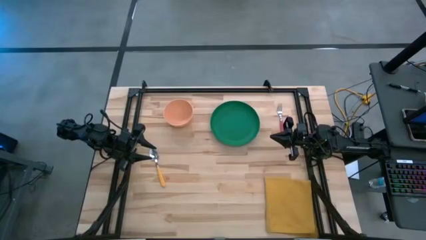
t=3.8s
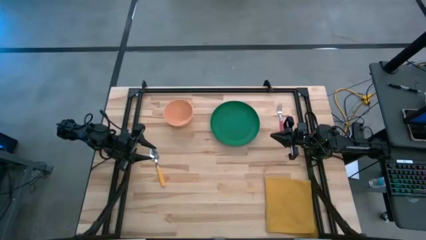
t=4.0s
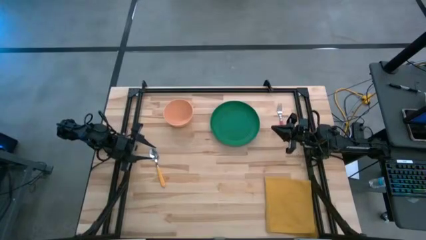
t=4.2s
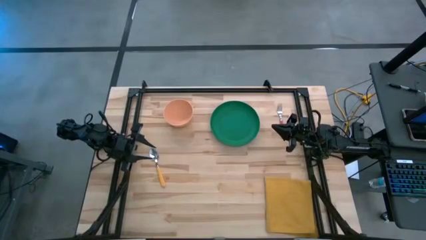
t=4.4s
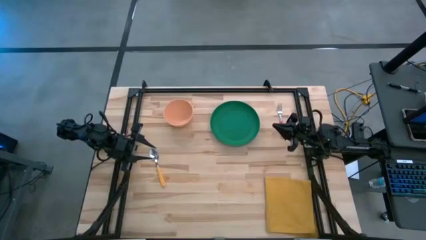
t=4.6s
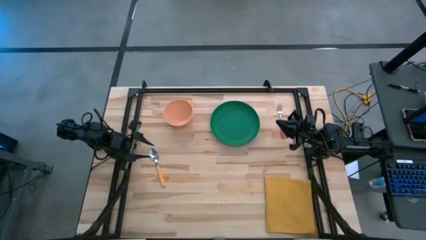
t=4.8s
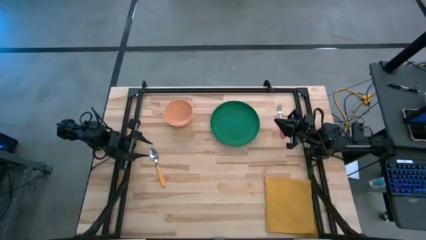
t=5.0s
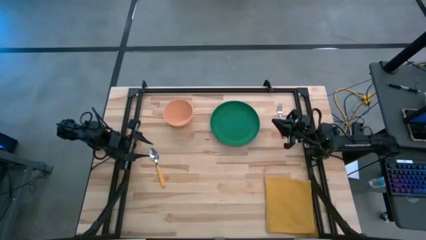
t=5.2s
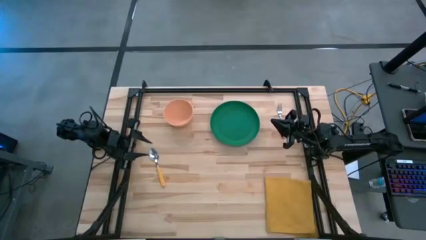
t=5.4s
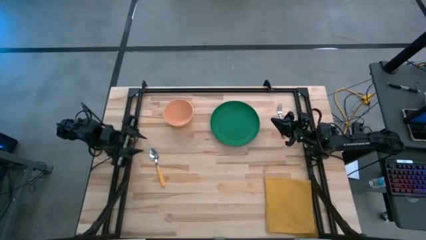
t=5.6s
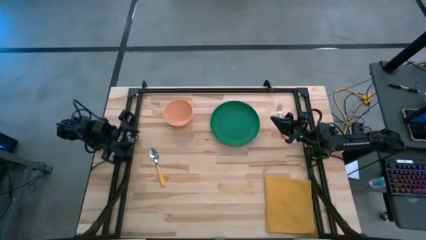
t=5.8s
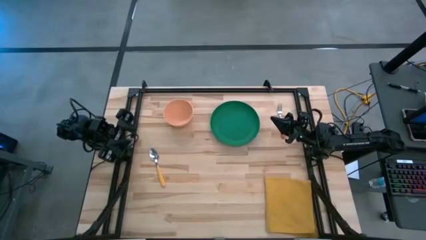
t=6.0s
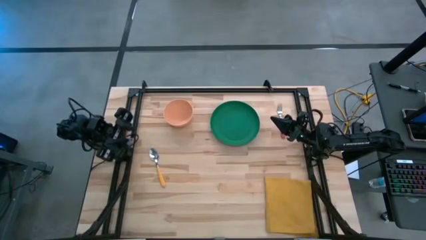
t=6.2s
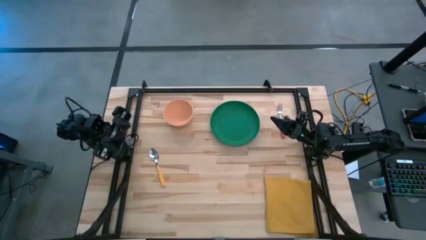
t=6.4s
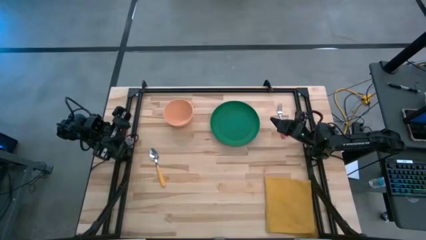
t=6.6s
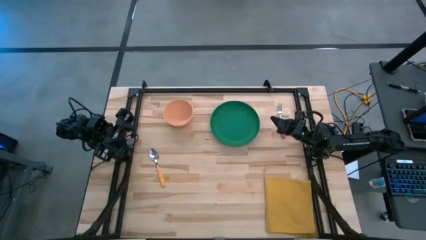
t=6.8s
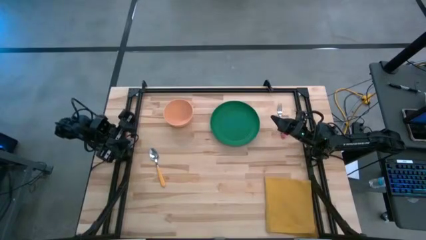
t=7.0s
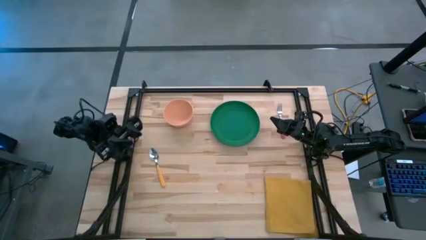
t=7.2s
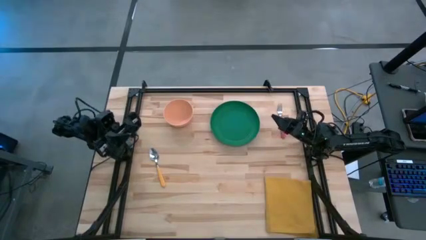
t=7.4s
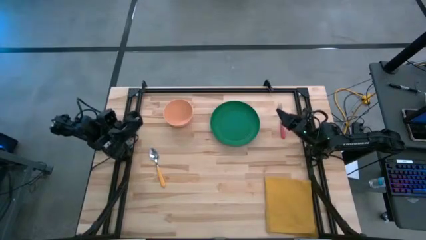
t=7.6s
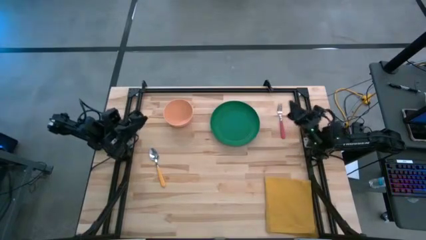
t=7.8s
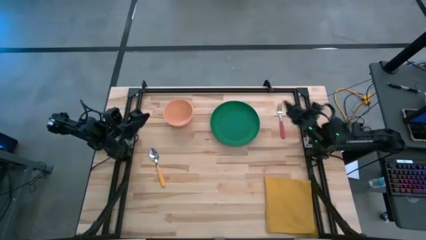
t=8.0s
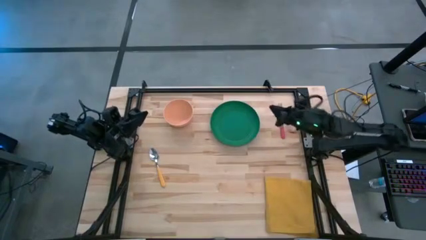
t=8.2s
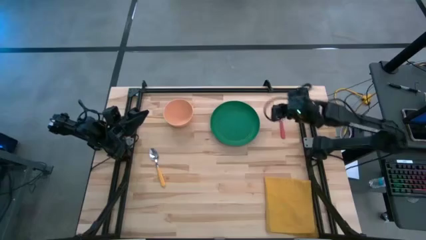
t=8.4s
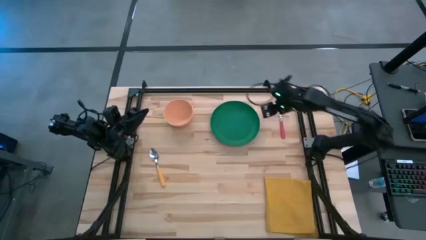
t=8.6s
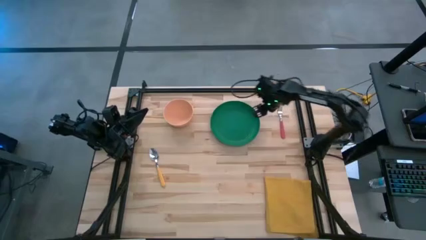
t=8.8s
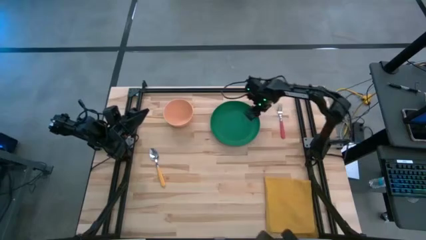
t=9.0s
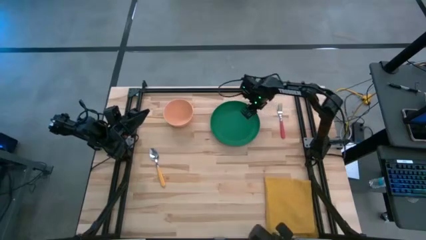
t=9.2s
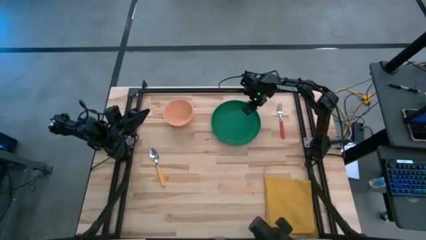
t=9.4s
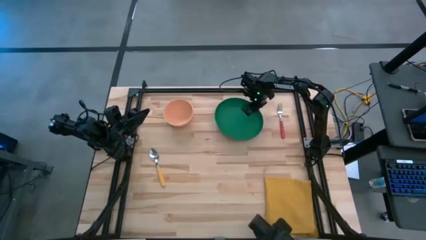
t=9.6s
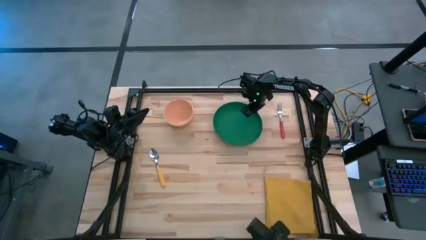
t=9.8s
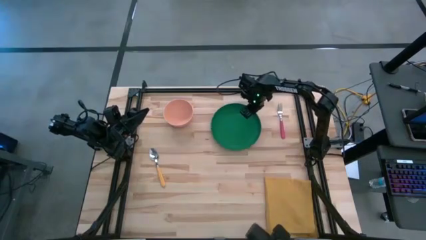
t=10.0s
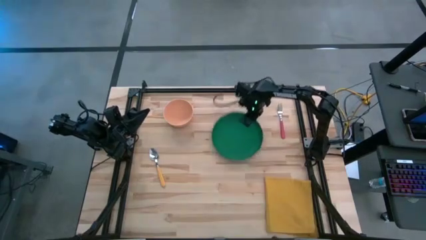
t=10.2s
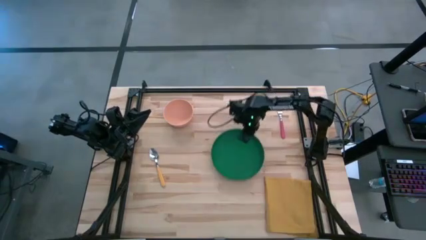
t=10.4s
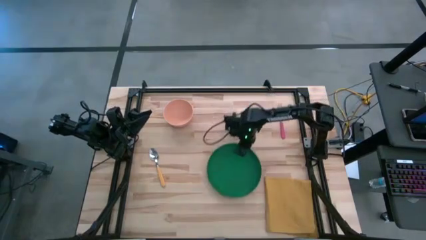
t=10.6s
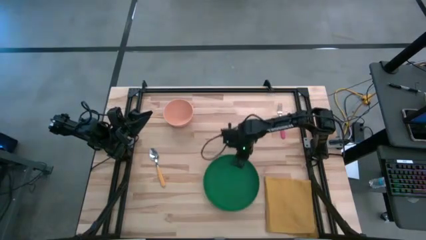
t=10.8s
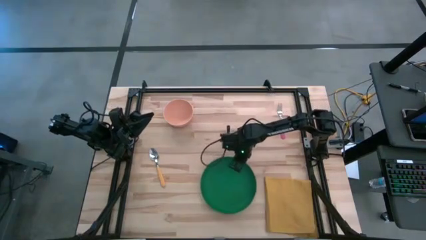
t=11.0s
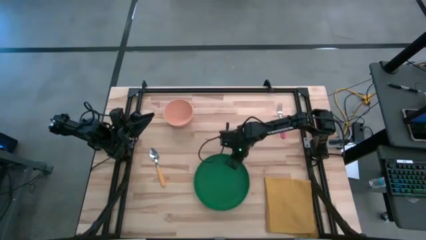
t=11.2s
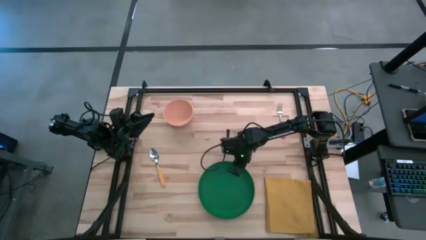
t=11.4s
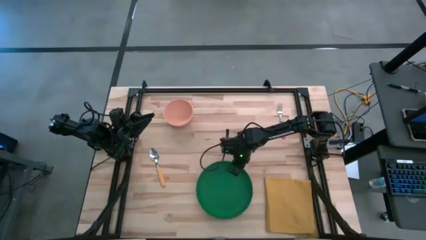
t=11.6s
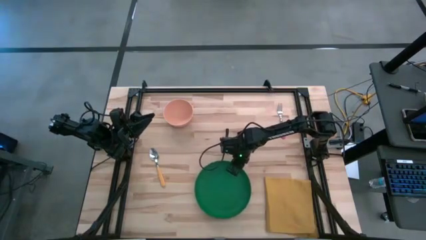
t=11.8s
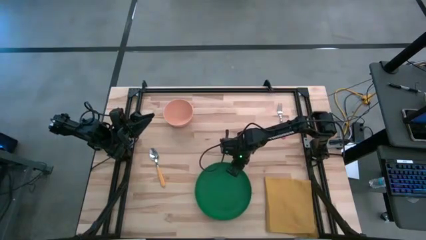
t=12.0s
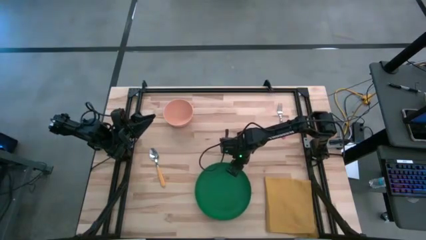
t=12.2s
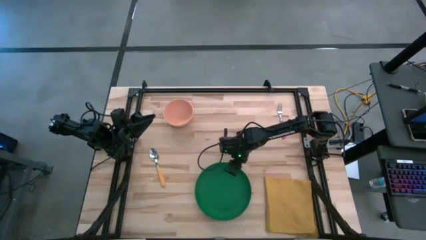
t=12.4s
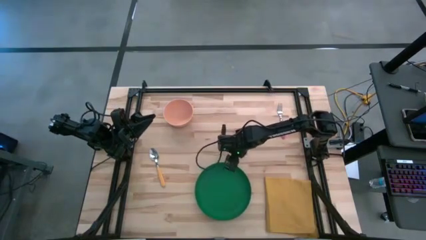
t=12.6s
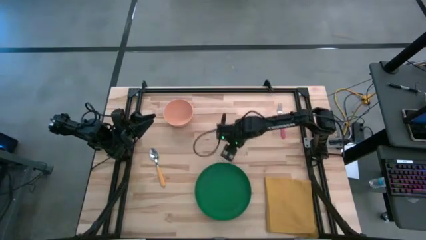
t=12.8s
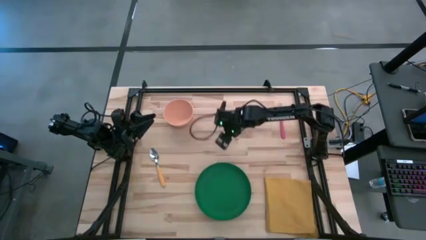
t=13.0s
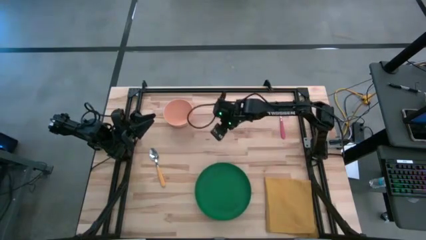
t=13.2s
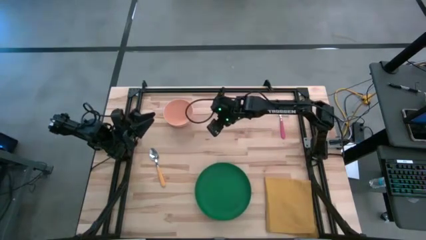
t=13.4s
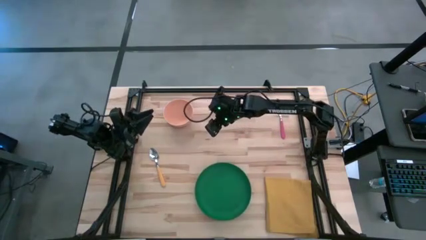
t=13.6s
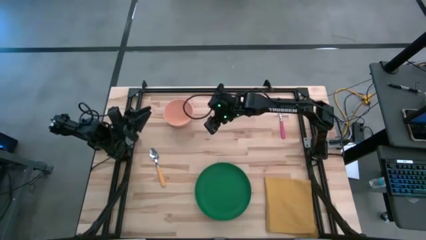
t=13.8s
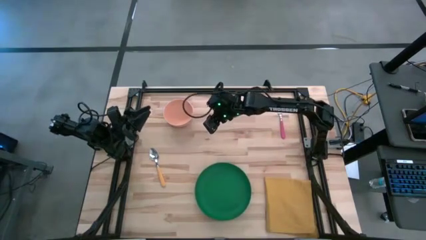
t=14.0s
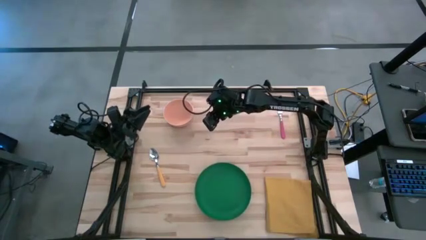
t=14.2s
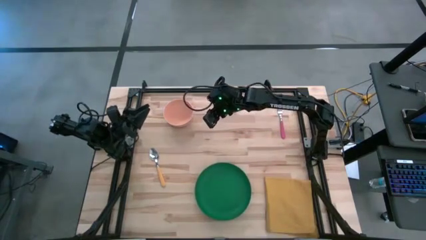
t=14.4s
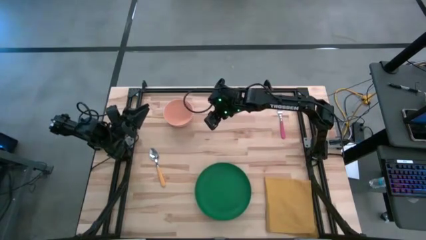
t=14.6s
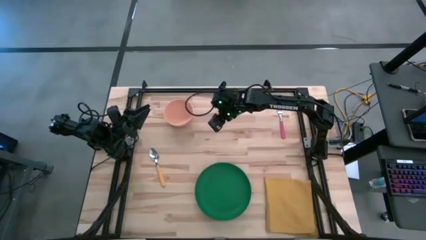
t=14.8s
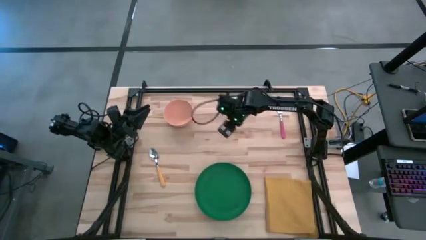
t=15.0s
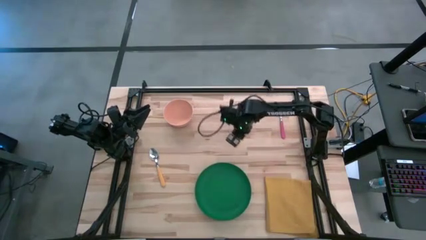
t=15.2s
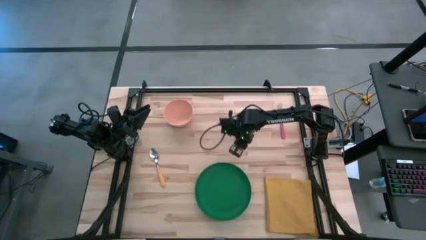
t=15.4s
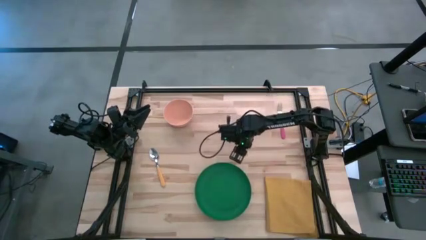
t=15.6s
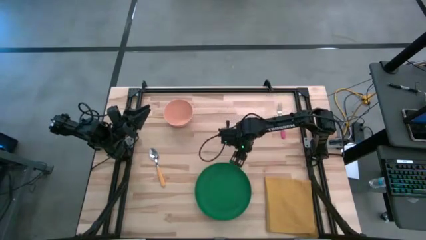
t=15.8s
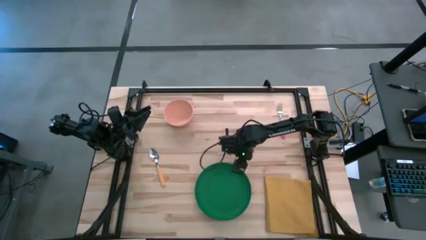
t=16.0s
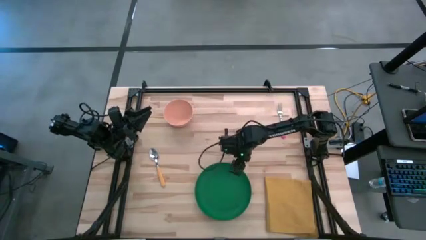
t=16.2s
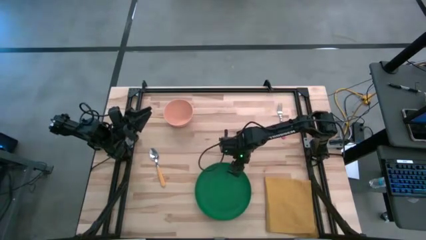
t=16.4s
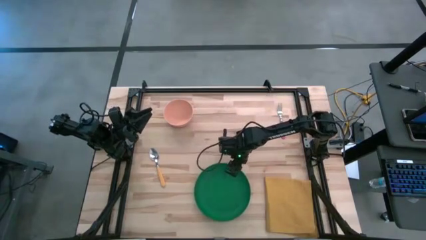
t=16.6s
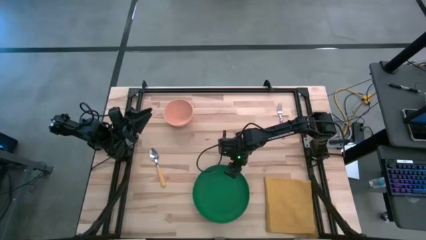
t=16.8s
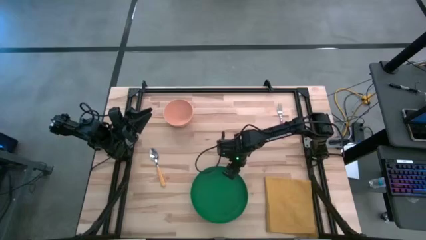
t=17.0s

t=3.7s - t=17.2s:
Task: Set table place
Move the green plate to the bottom of the table

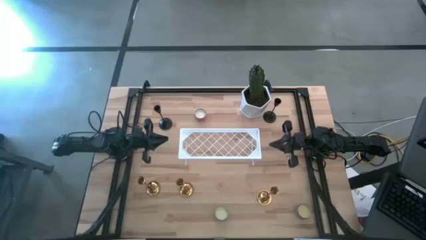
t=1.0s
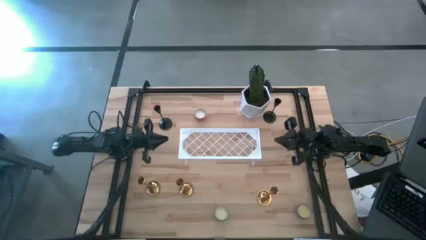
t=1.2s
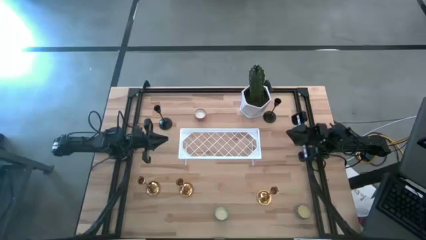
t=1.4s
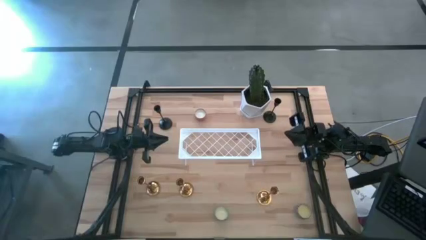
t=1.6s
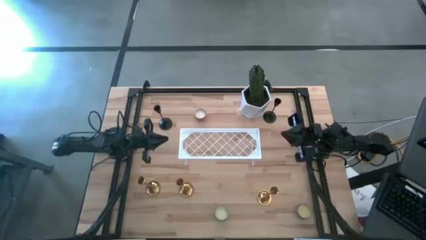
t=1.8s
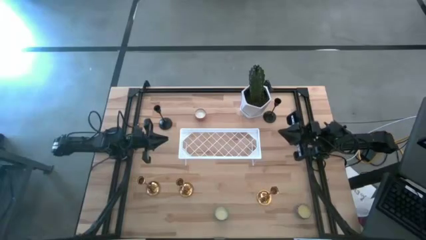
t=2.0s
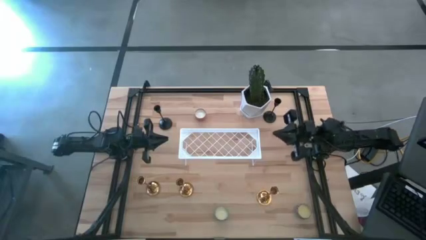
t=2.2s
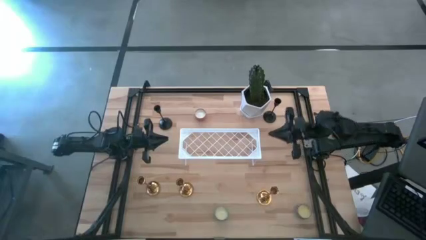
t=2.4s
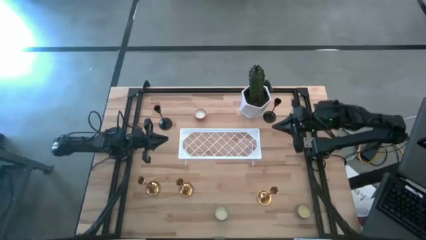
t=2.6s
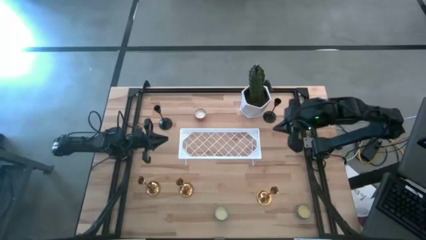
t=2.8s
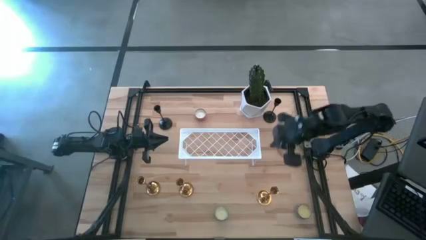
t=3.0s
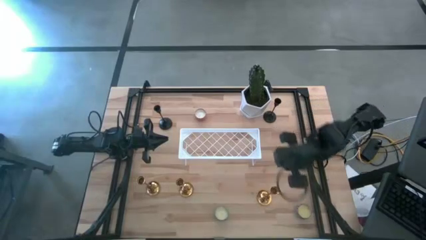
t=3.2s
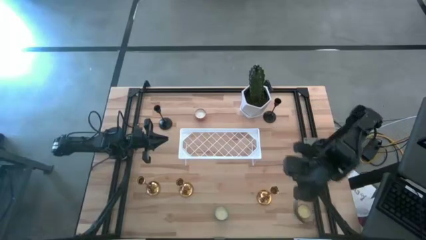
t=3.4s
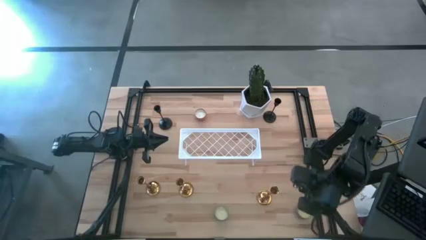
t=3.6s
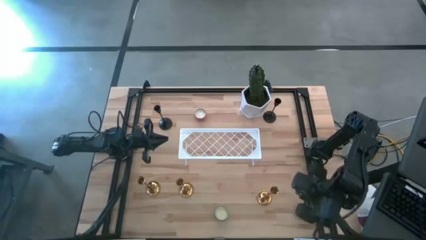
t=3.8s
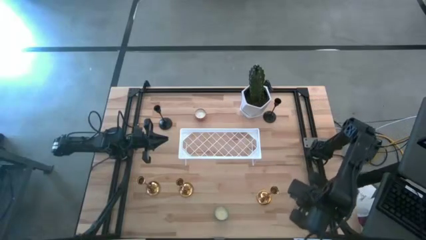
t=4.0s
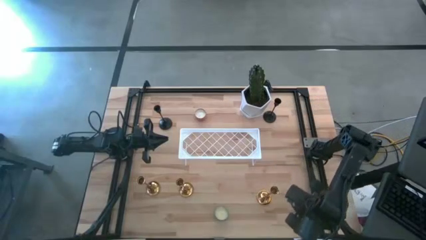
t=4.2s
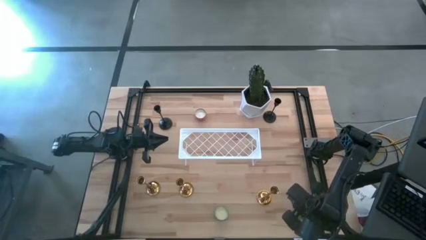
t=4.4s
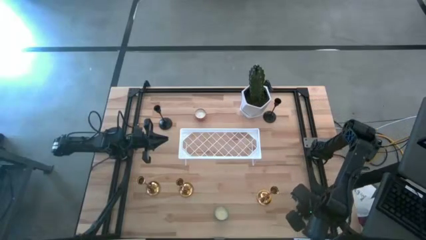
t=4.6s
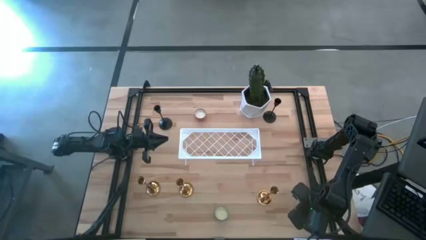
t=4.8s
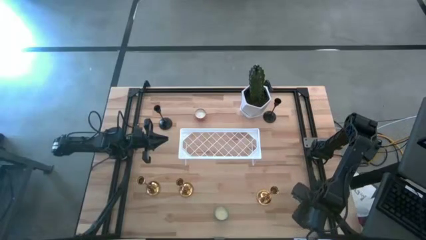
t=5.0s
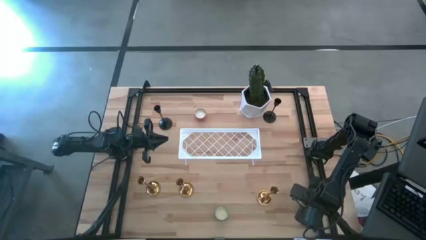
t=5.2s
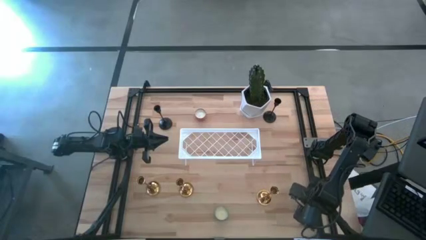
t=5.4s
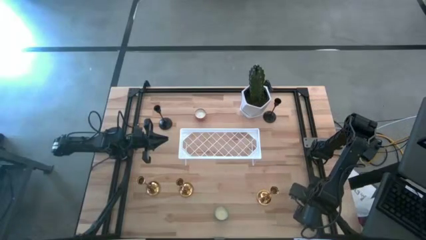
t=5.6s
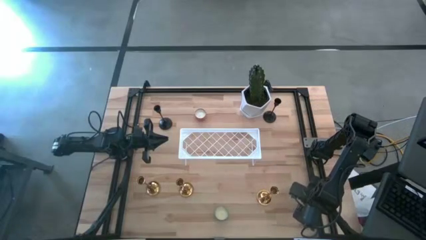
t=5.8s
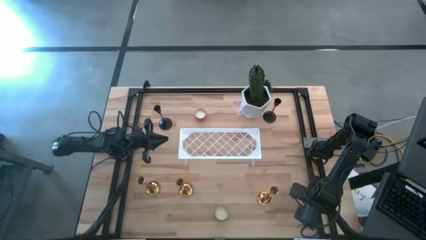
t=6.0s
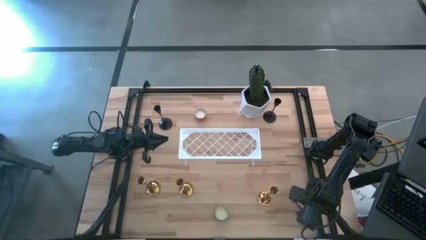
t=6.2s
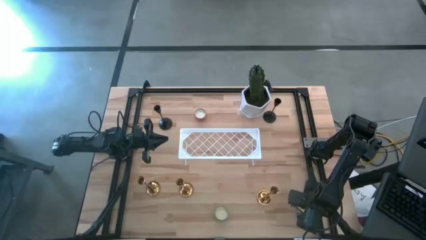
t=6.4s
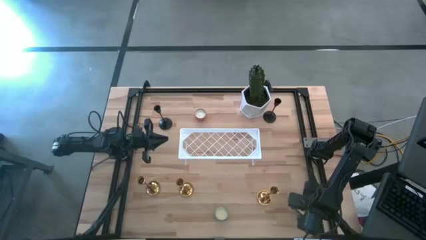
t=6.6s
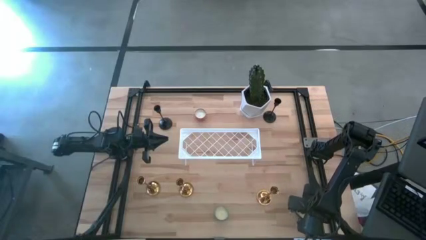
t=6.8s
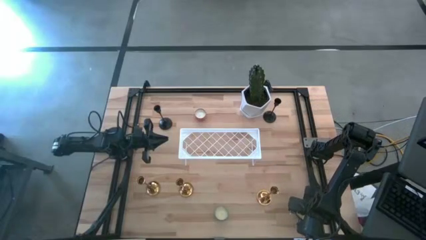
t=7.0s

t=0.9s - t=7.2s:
Task: Pick & Place candle stick holders
Put the red scented candle on the shelf
